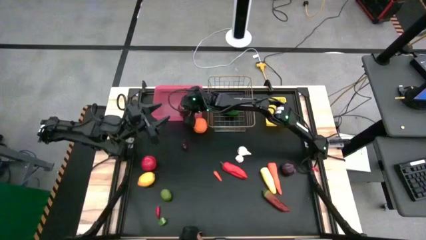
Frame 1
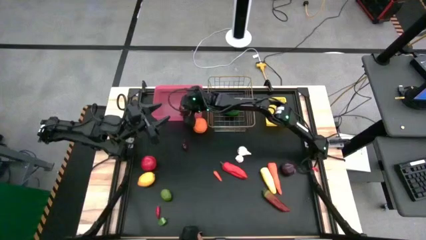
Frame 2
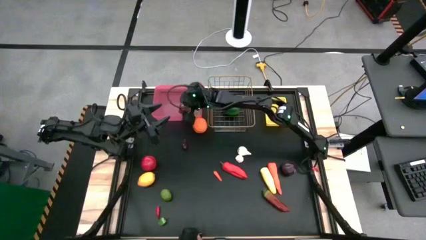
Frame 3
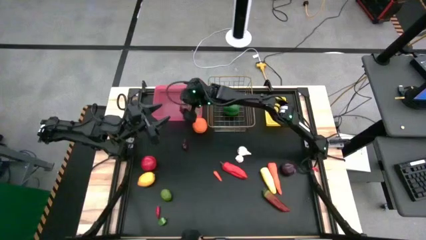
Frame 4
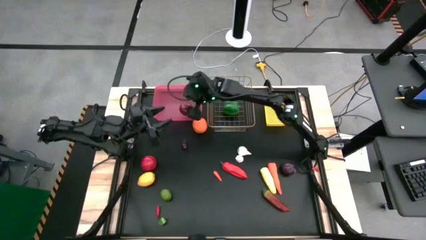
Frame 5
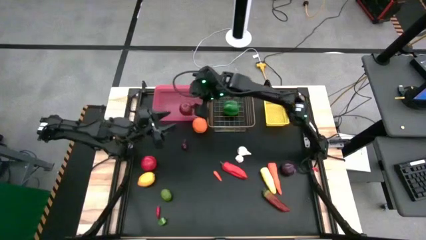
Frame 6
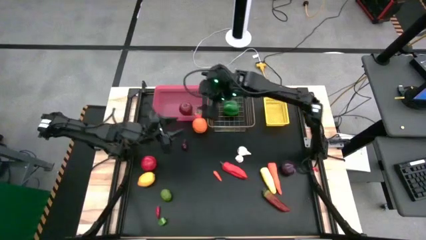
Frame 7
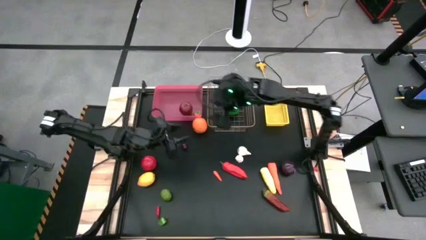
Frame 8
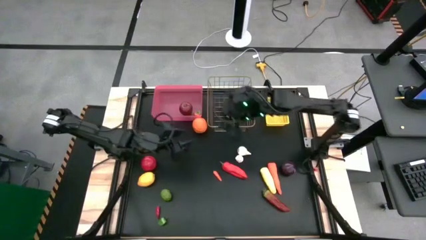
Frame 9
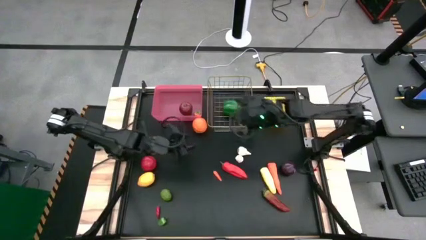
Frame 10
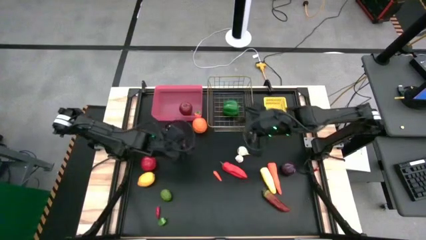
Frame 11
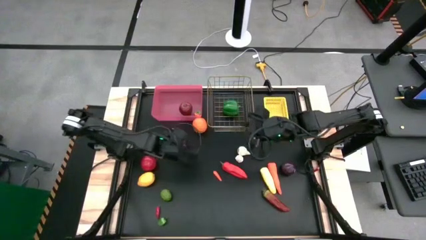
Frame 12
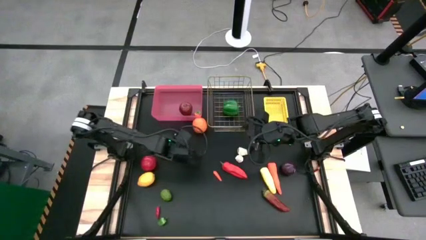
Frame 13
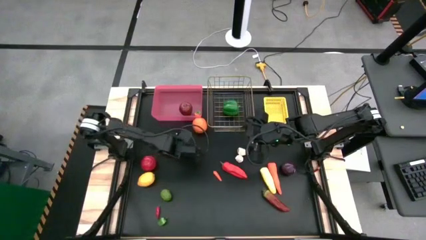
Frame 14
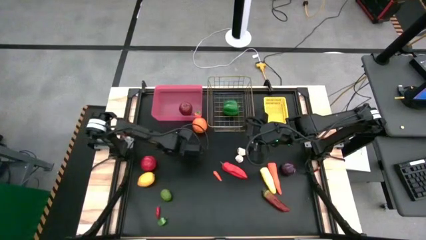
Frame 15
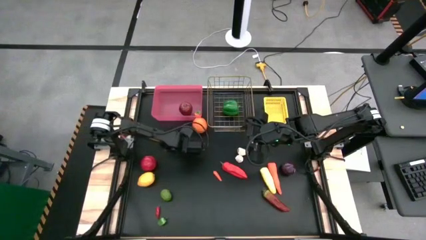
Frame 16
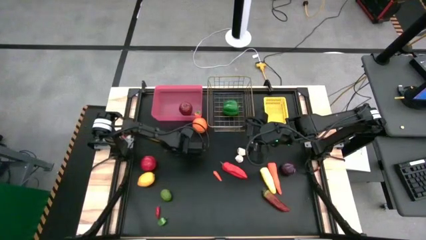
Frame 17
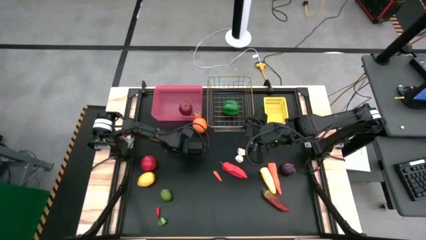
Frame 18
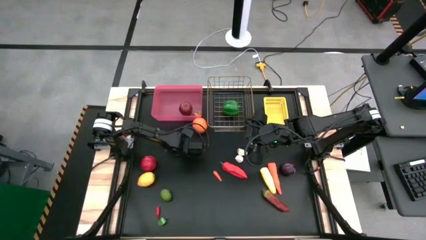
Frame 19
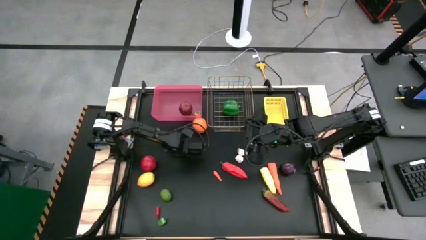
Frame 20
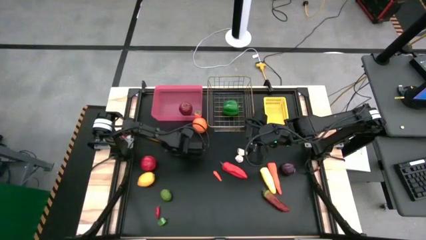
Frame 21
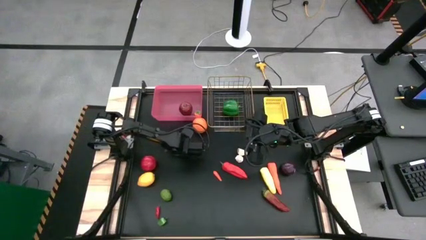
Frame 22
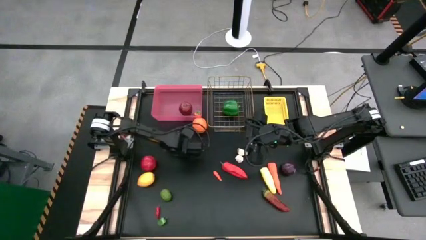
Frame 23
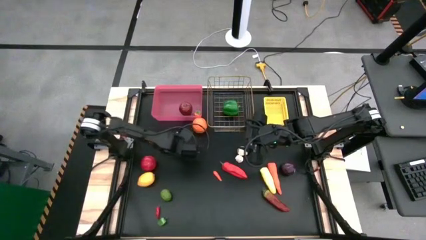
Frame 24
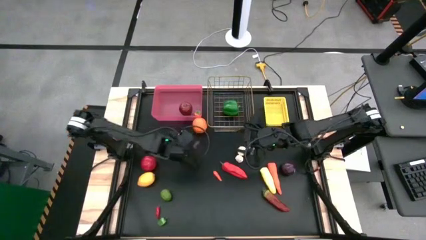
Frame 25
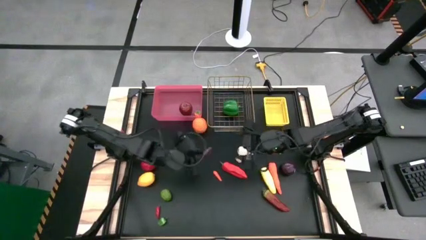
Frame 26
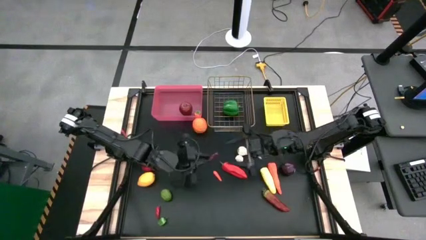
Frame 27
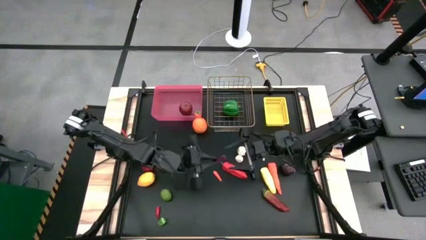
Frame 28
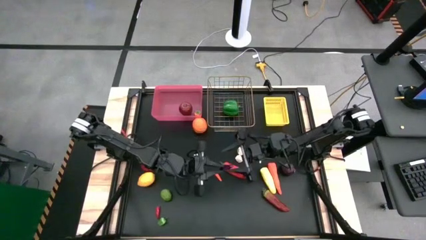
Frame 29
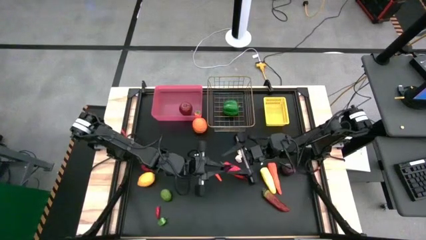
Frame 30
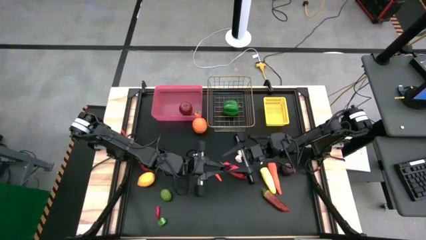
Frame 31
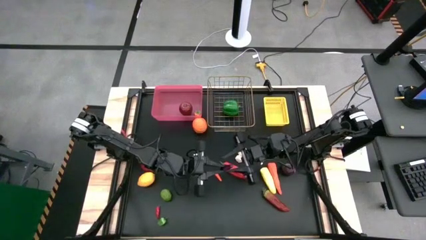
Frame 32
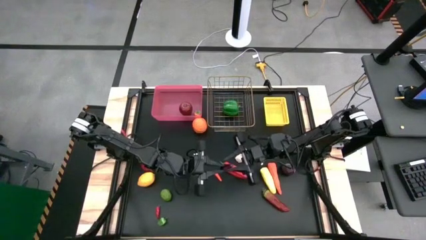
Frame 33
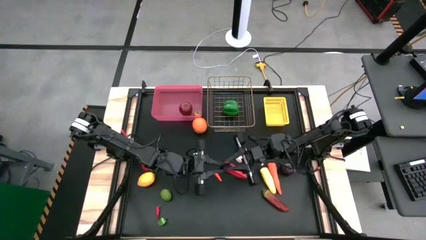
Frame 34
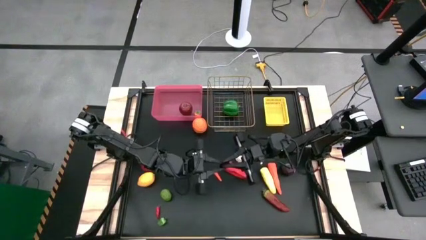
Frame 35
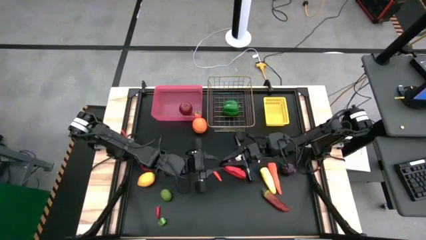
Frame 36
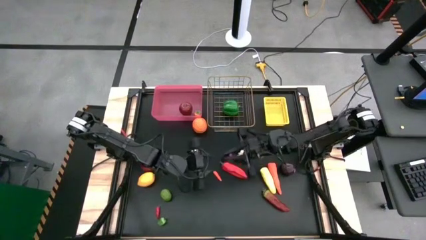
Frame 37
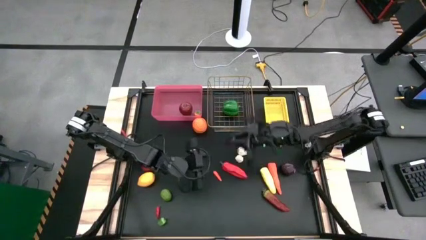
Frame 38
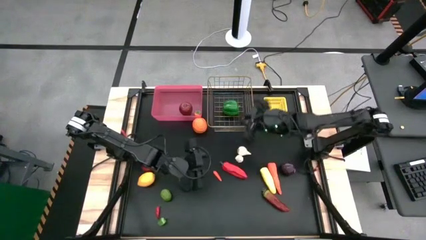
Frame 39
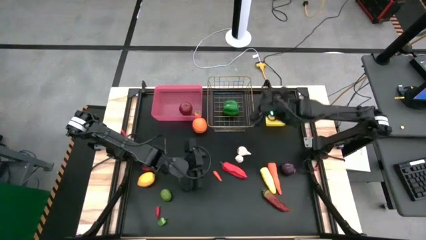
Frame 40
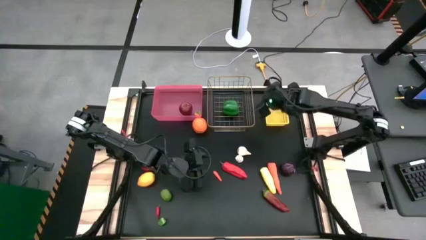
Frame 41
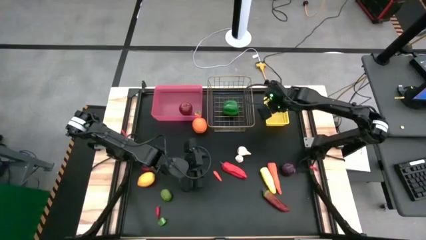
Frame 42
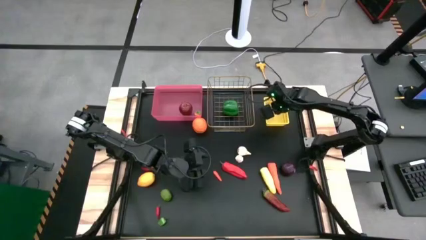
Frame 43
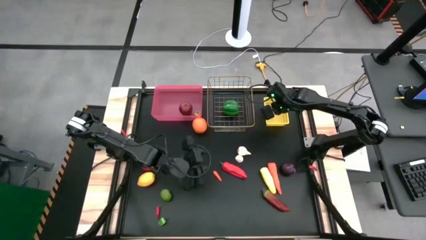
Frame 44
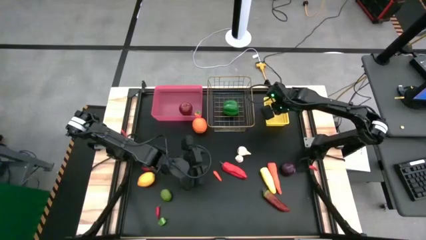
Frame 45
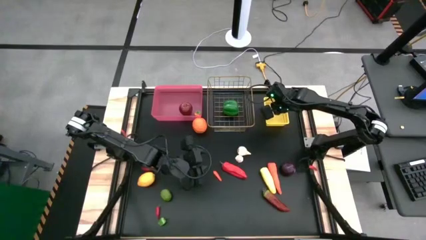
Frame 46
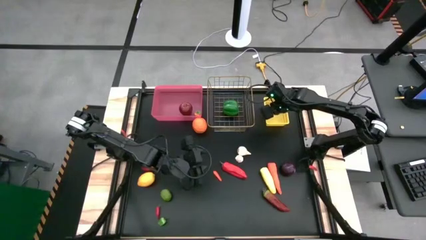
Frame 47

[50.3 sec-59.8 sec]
Task: Sort produce into baskets
Put the small purple eggplant into the yellow bin

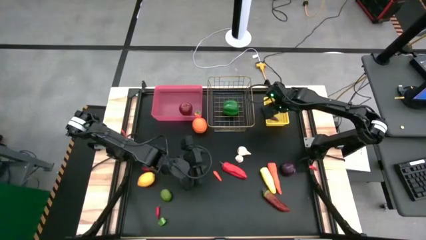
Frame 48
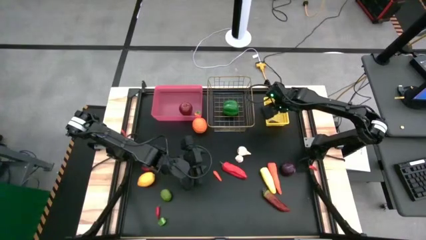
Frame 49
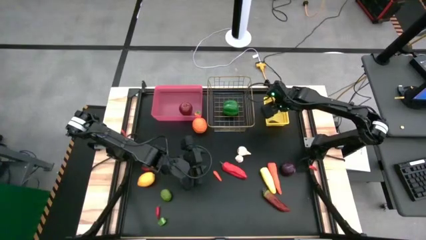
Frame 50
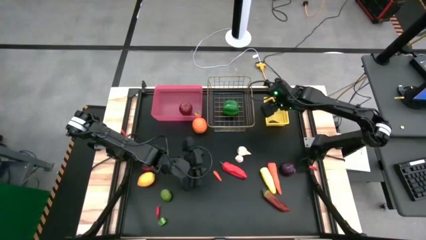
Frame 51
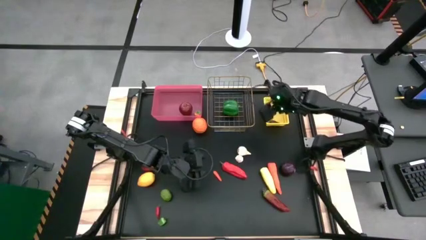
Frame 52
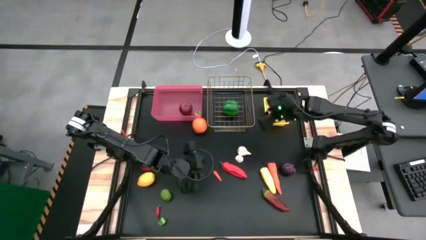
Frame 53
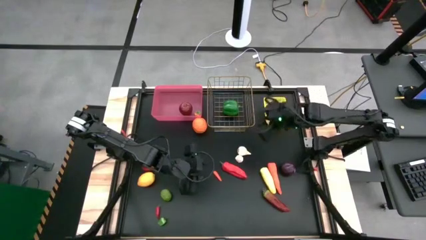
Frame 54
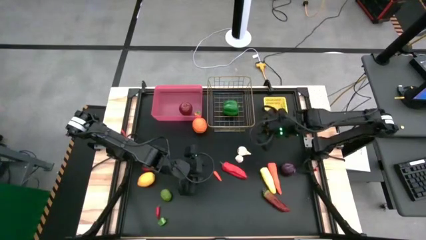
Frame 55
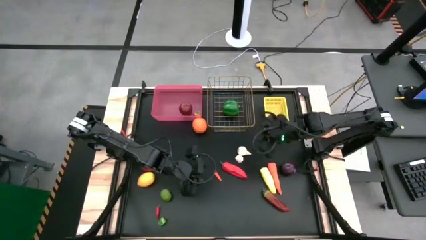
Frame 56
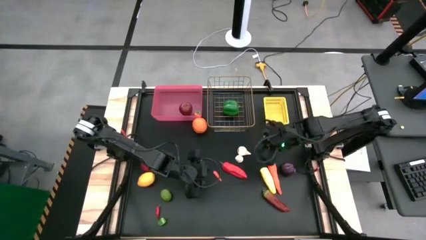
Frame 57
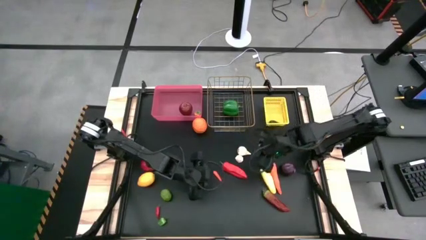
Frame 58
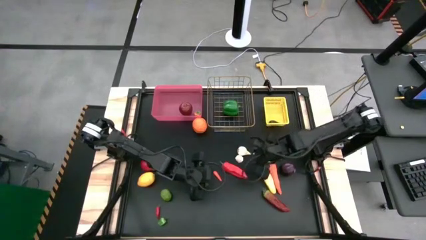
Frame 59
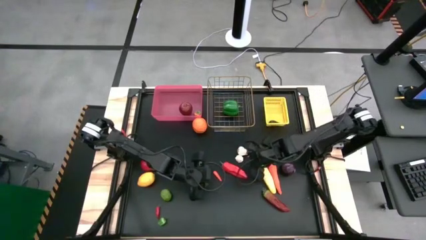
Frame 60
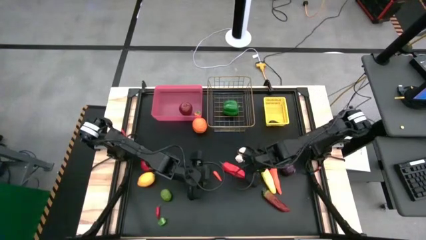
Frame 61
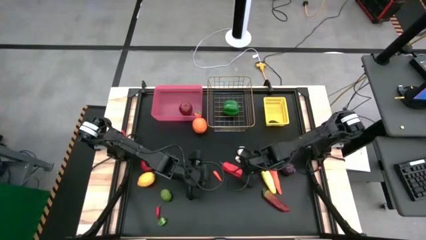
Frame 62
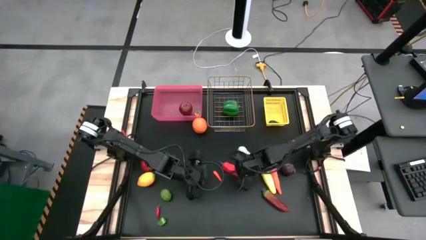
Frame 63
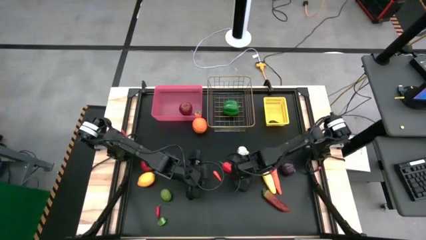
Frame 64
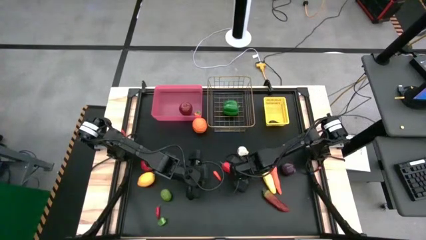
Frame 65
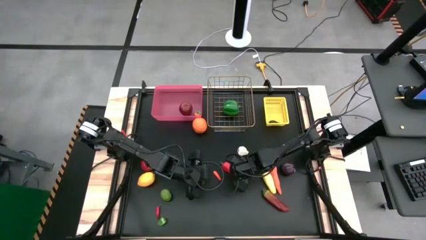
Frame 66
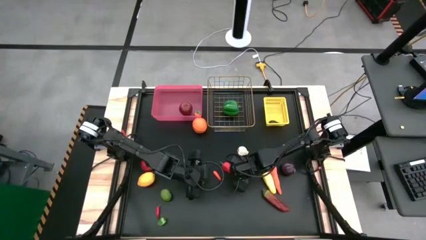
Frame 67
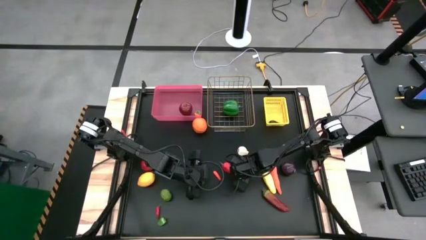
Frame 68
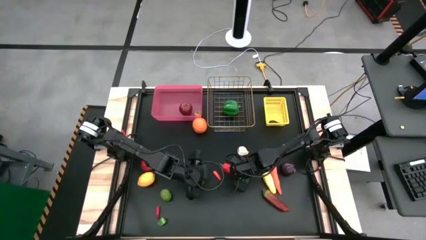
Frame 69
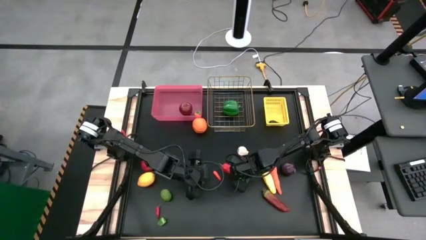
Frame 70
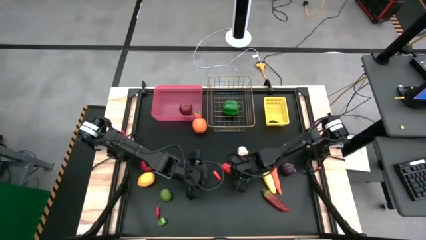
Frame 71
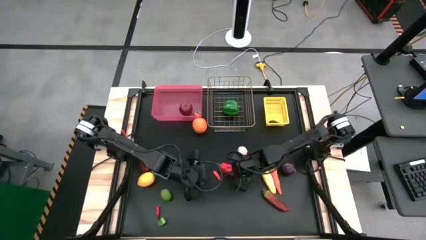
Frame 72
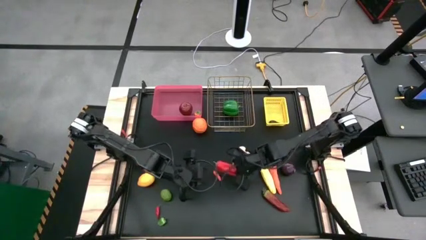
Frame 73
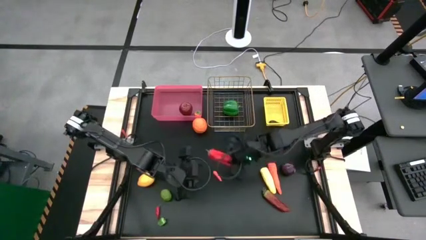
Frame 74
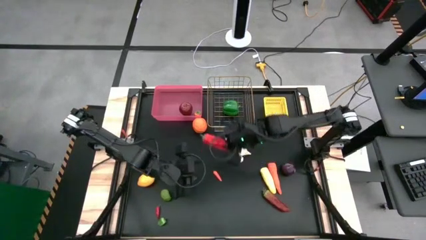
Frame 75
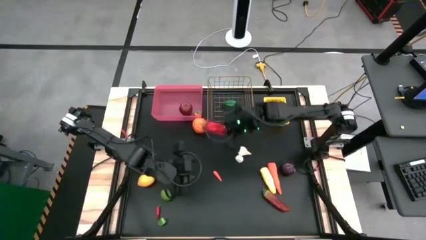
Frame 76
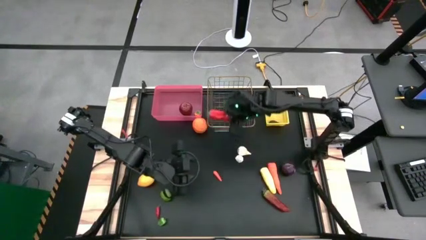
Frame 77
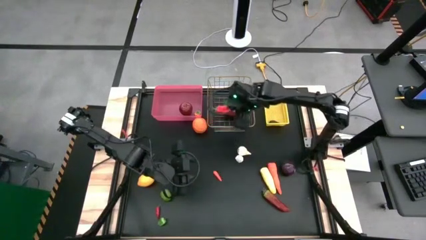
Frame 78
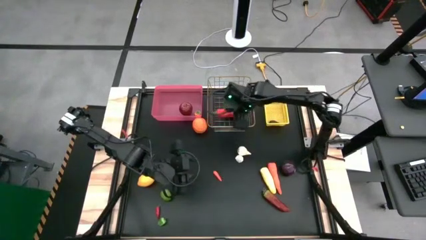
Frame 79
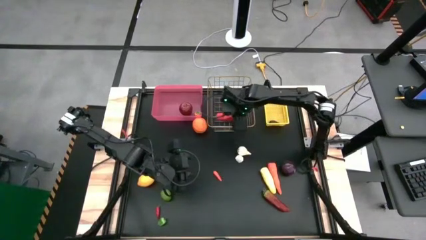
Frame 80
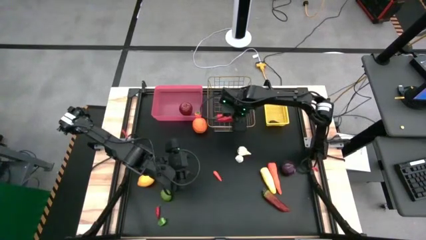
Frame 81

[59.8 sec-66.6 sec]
Put the large red chili pepper into the gold mesh basket
